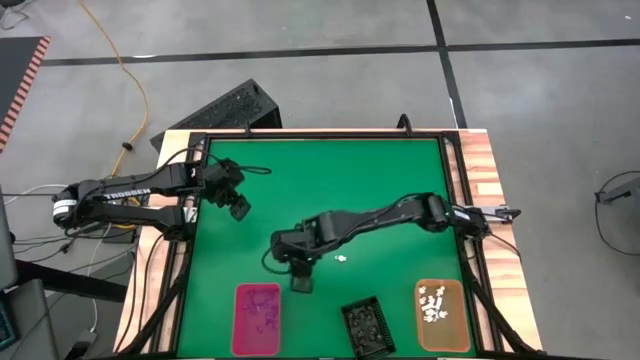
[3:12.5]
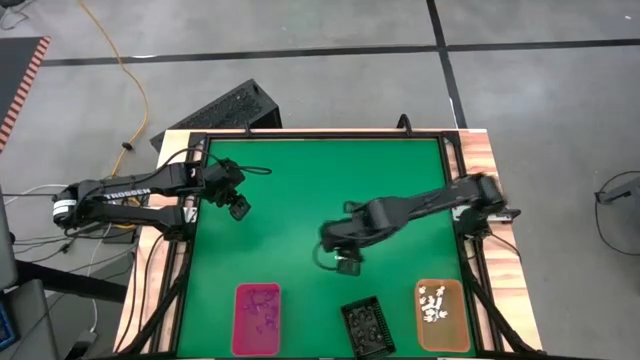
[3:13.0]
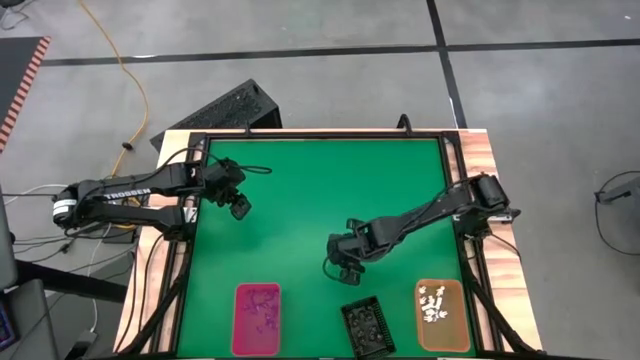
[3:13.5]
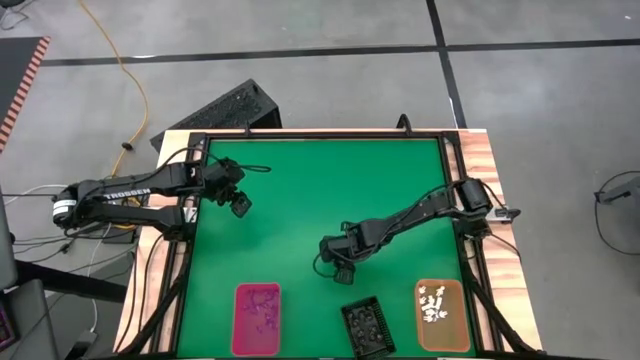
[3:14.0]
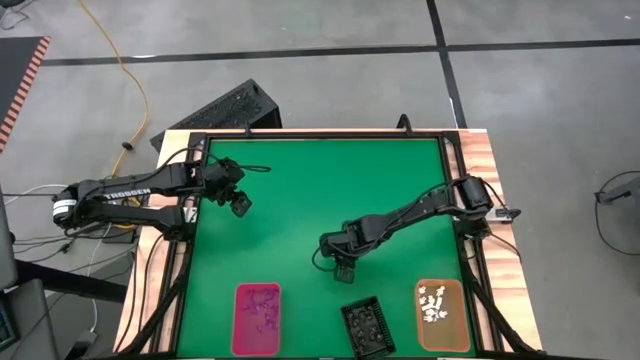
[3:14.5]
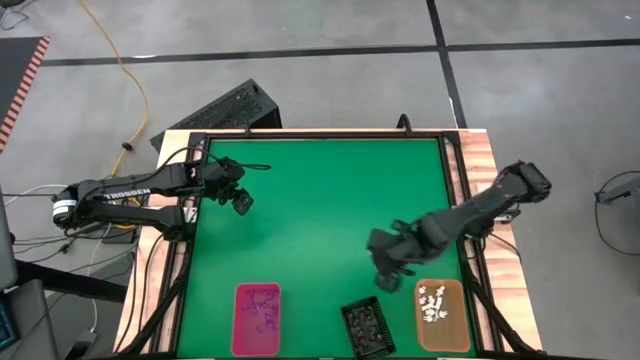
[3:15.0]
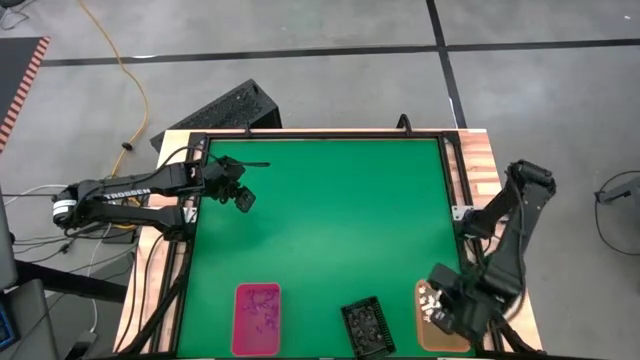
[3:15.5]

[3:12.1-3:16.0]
Task: Sort Halloween decoration
Put the white skeleton toy in the right orange organizing bin

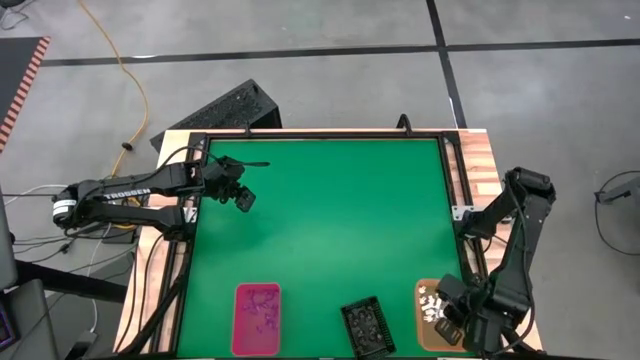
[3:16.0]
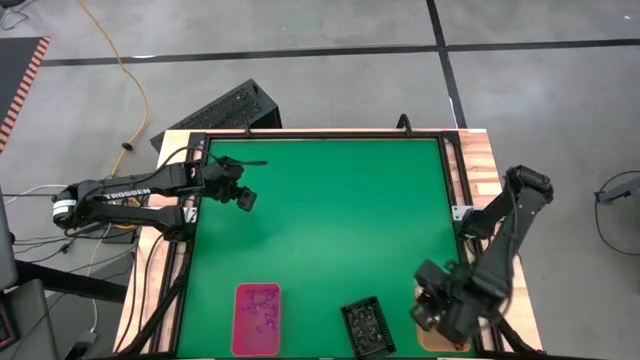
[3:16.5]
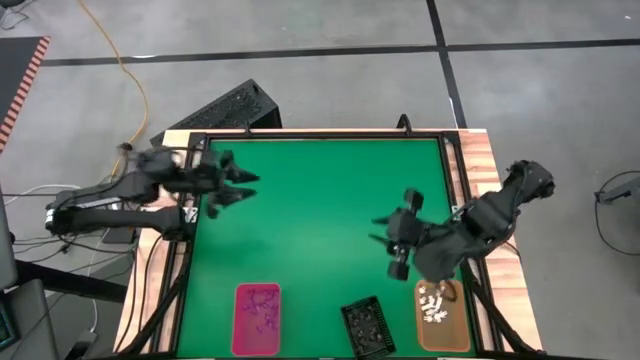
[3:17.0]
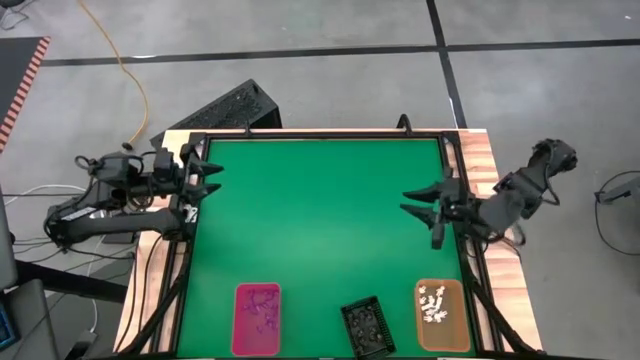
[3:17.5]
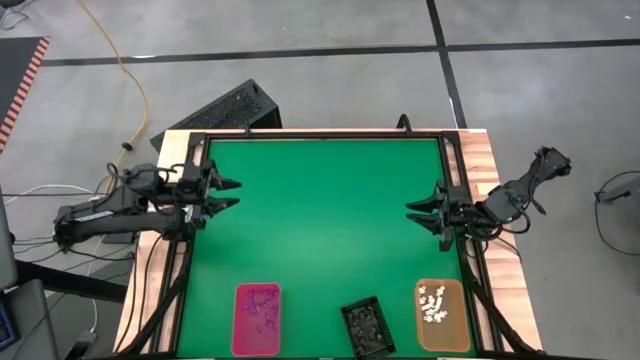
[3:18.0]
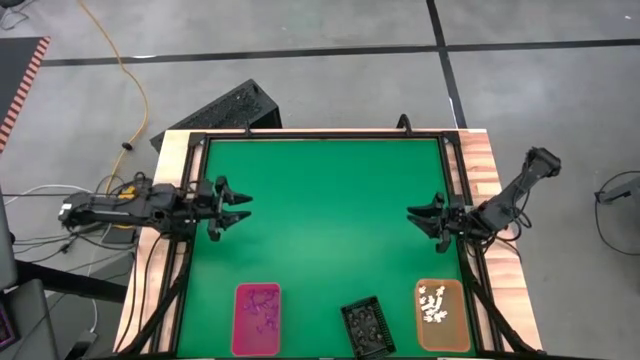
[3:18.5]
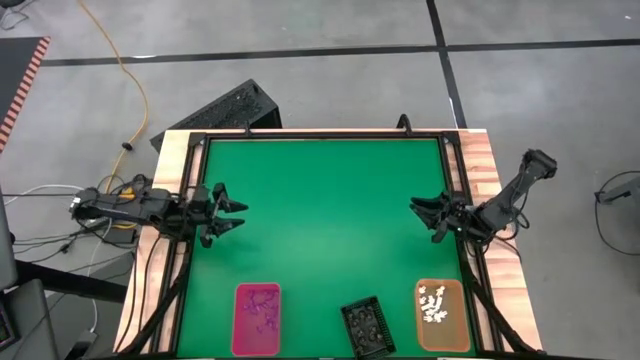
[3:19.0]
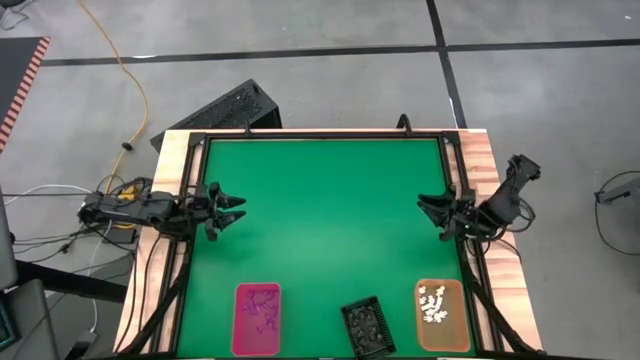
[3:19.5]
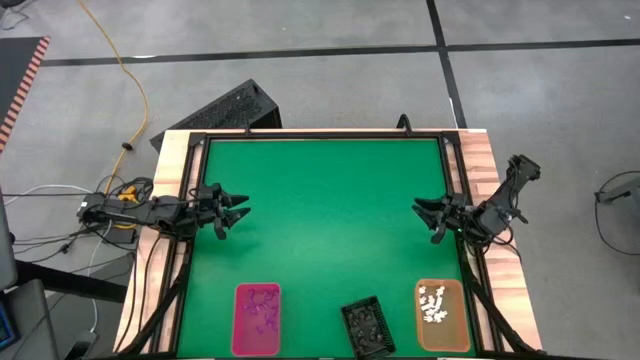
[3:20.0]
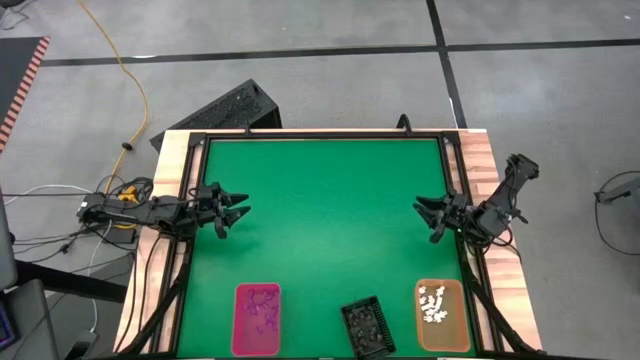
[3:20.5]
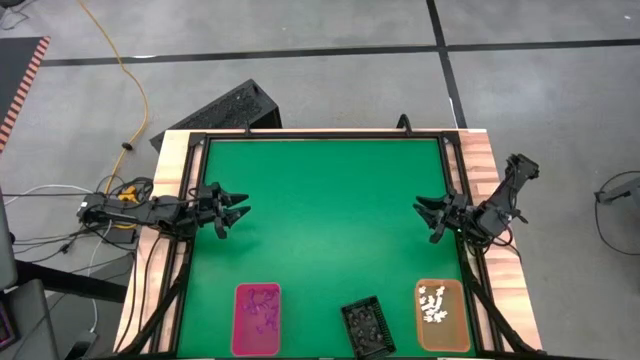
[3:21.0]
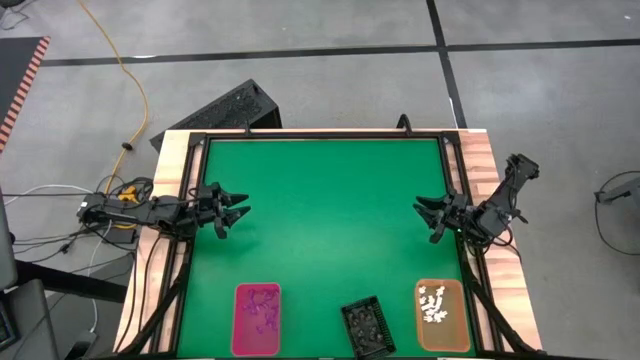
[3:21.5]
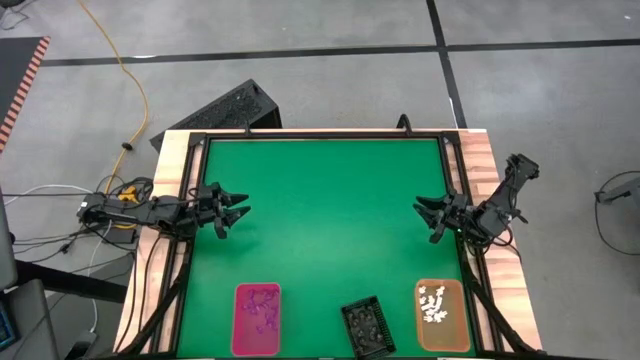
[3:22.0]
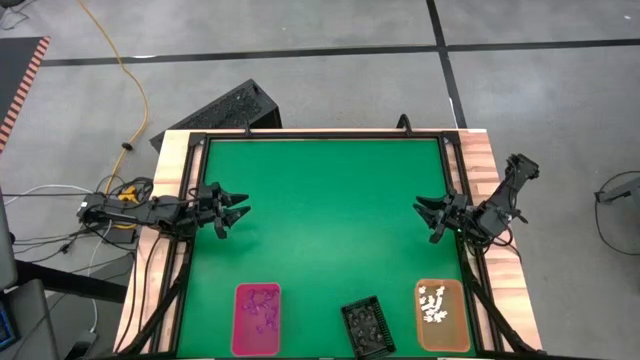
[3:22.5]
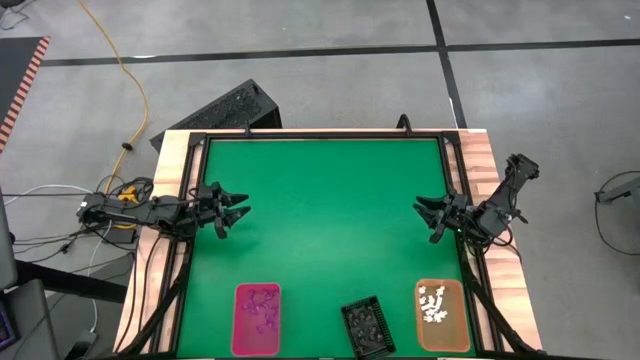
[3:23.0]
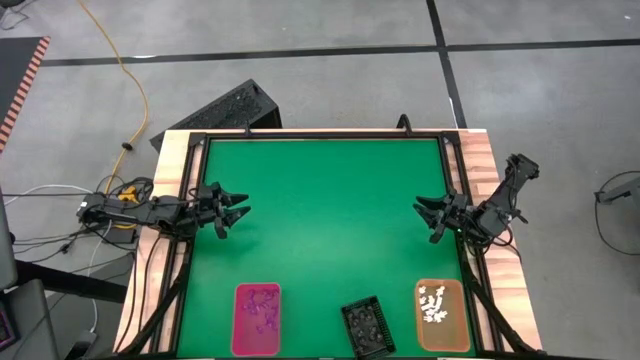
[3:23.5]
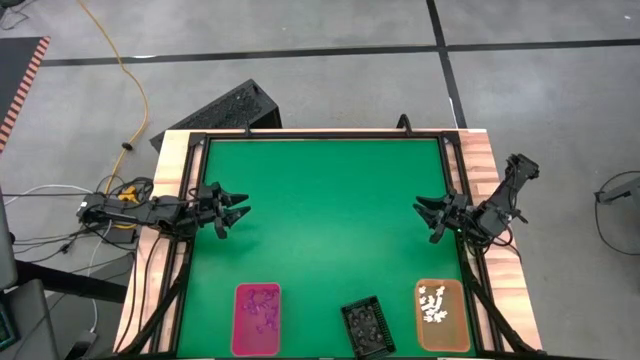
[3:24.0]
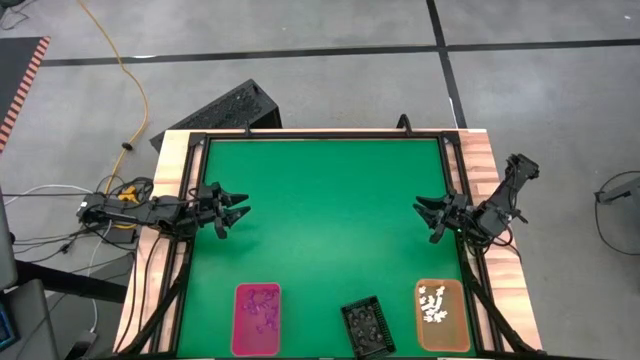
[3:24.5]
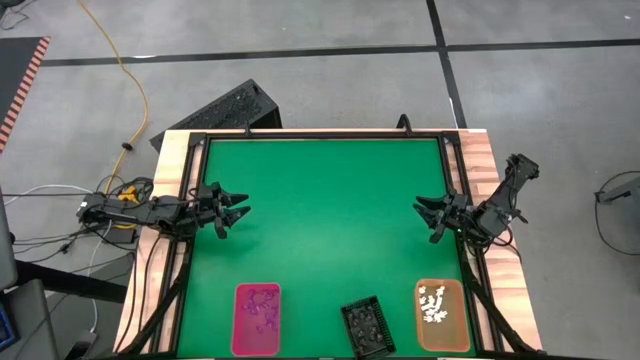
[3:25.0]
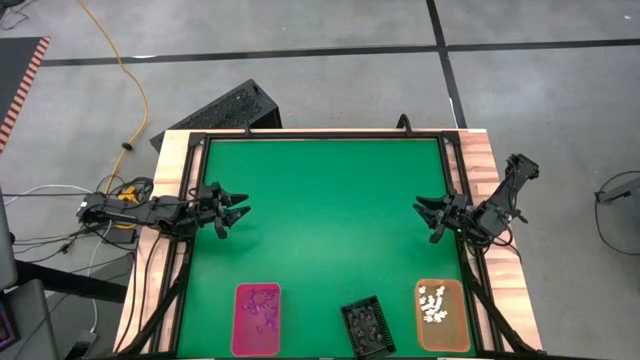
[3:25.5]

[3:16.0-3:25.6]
Return to Home Position

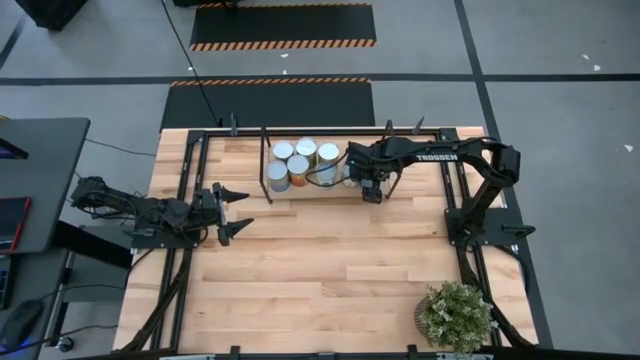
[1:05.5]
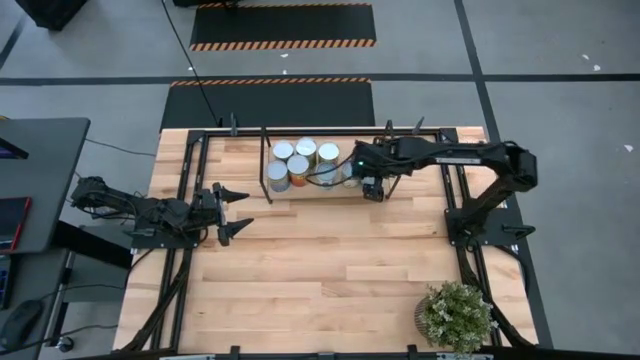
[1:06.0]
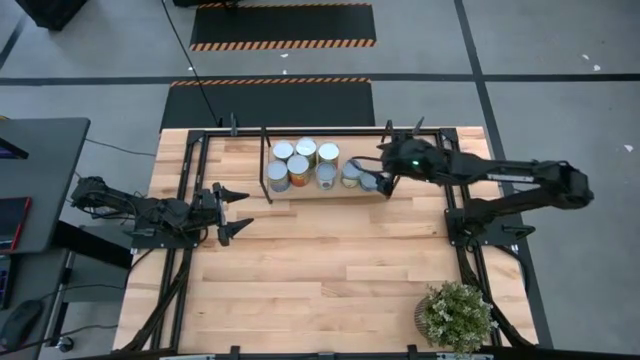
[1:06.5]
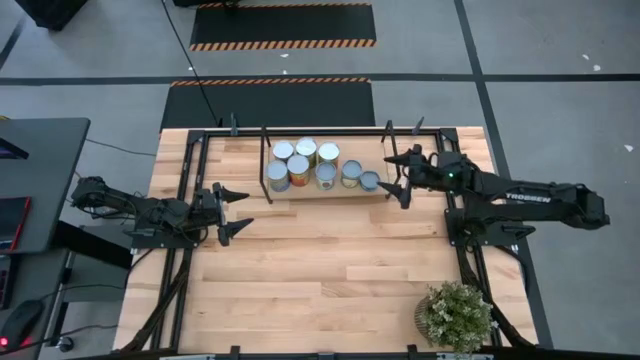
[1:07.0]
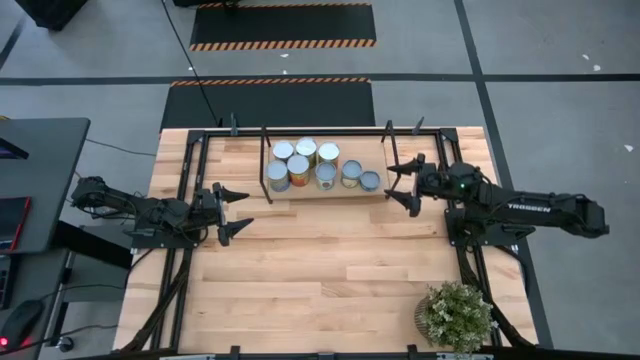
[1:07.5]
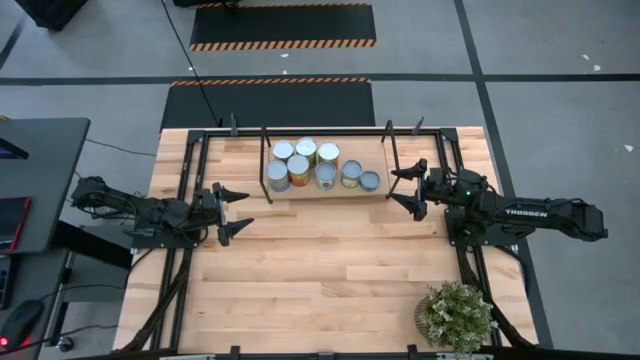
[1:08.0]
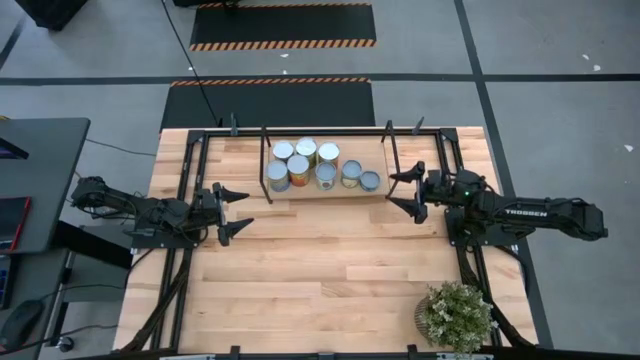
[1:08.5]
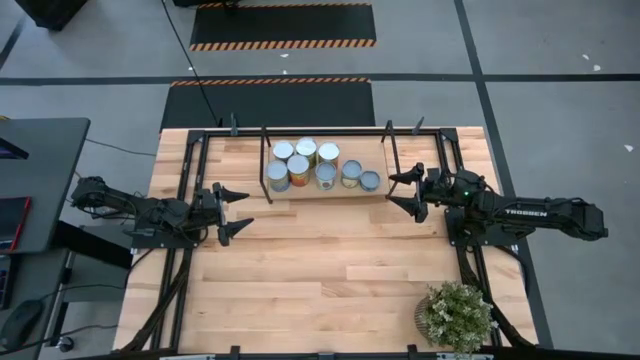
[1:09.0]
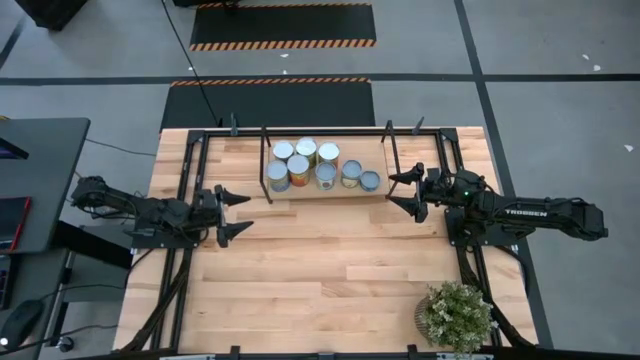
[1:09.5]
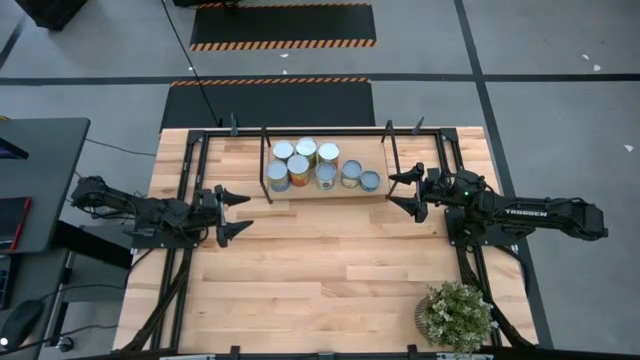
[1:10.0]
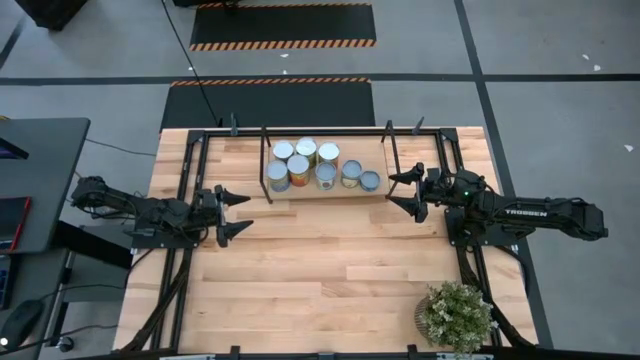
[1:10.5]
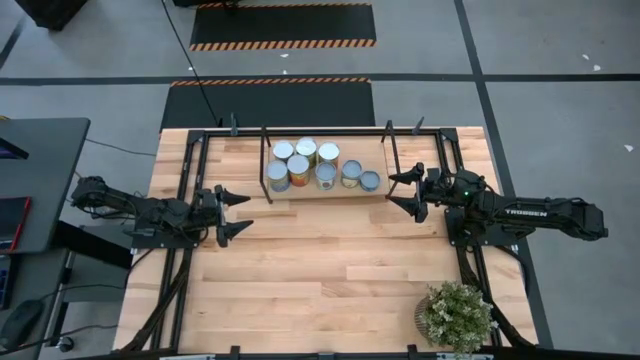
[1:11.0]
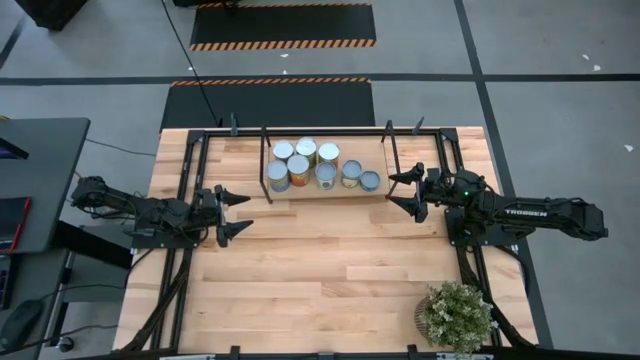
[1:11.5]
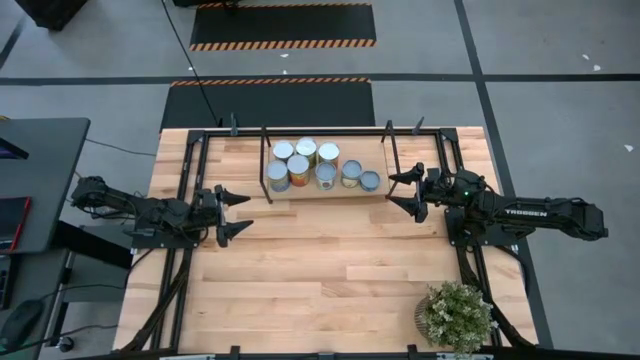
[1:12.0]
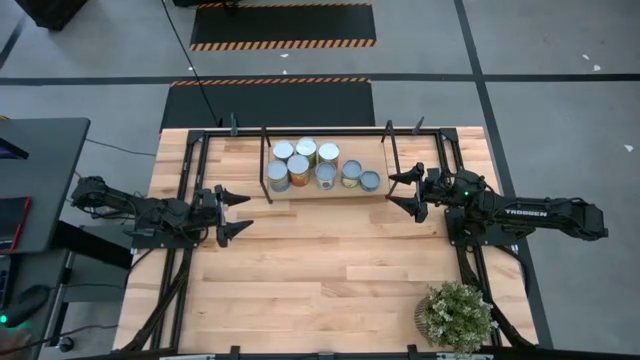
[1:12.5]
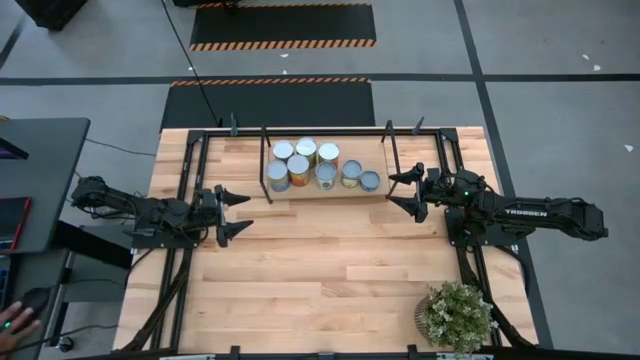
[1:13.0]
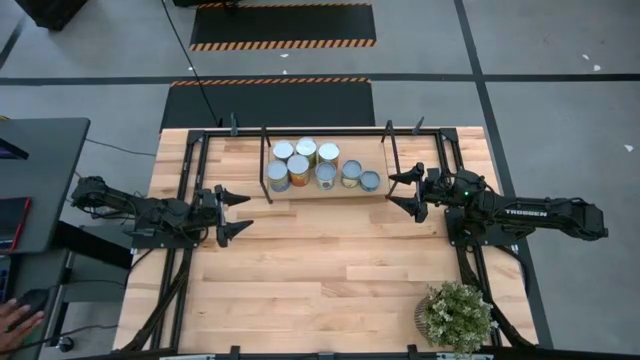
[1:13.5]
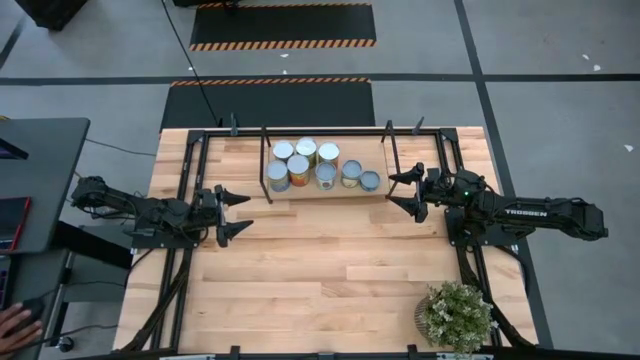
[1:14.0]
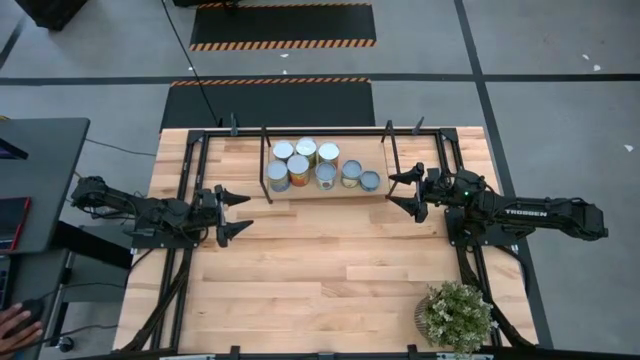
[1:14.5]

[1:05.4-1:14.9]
Task: Pick and place cans onto a shelf
Return to Home Position
